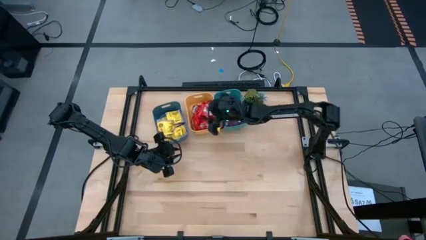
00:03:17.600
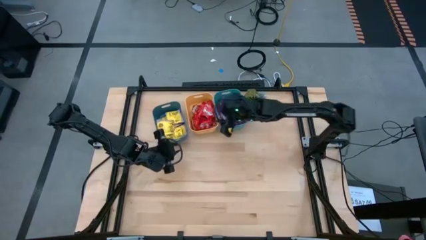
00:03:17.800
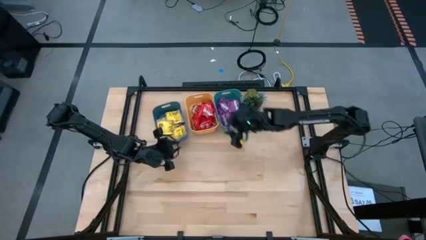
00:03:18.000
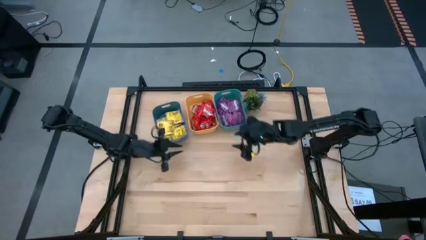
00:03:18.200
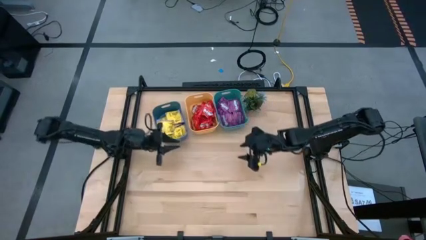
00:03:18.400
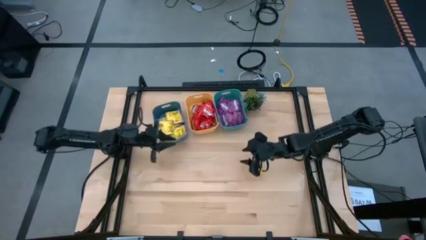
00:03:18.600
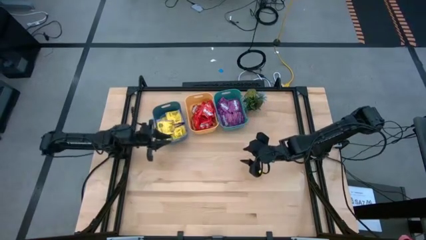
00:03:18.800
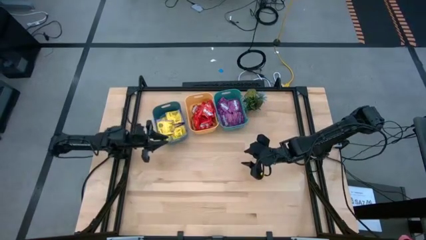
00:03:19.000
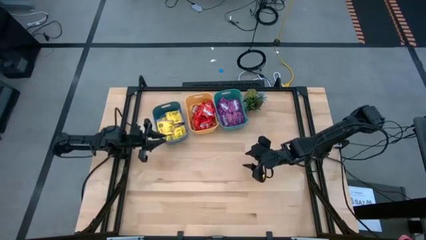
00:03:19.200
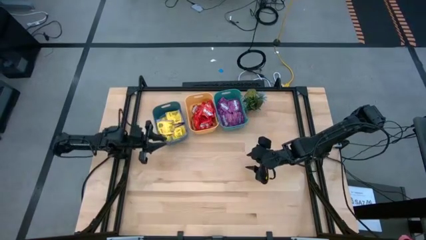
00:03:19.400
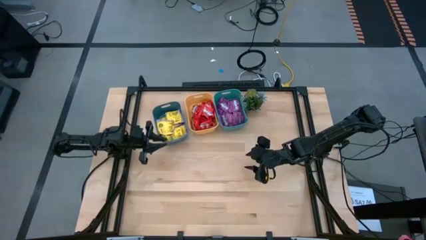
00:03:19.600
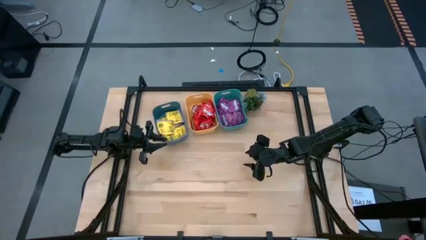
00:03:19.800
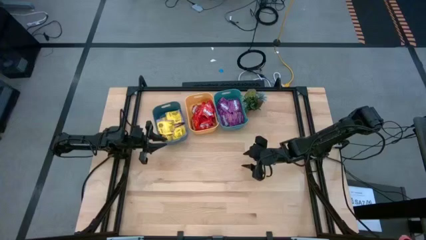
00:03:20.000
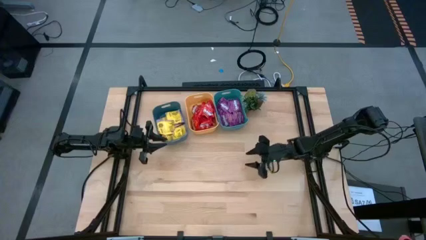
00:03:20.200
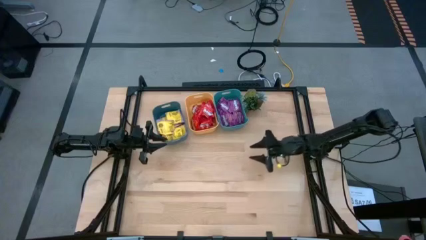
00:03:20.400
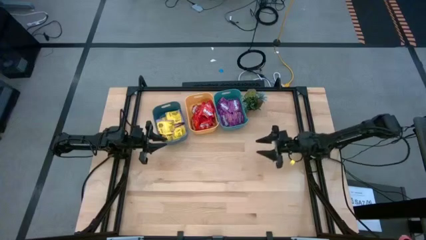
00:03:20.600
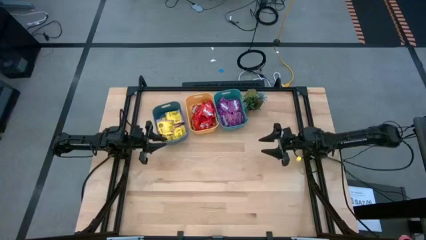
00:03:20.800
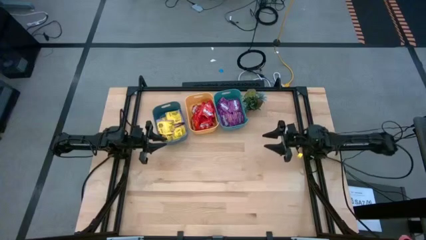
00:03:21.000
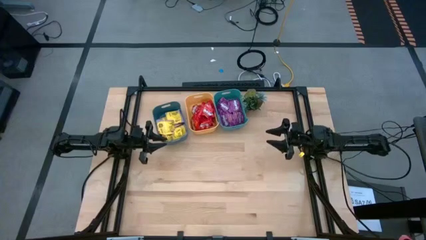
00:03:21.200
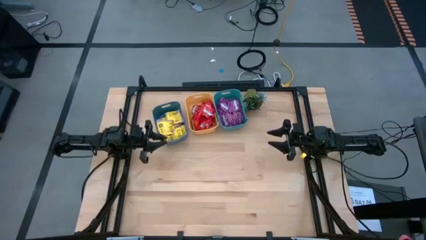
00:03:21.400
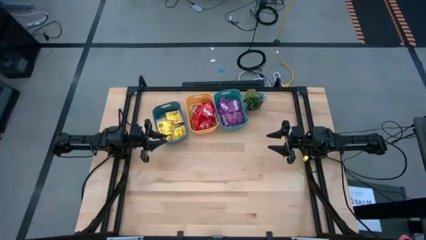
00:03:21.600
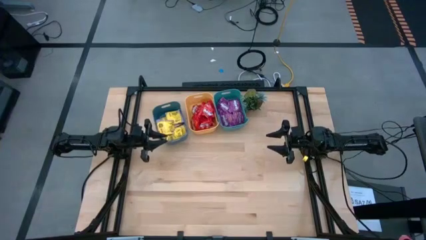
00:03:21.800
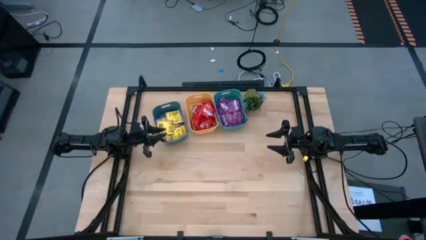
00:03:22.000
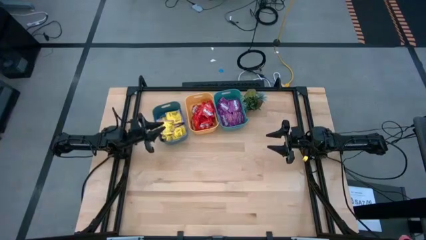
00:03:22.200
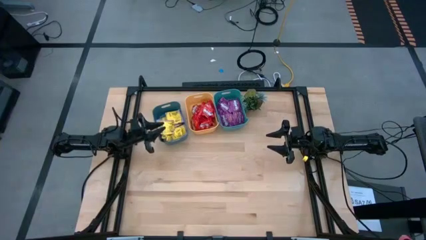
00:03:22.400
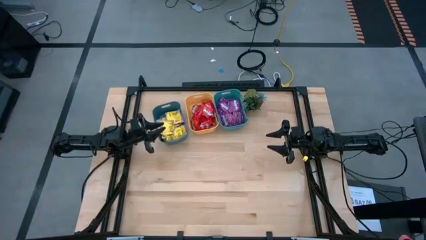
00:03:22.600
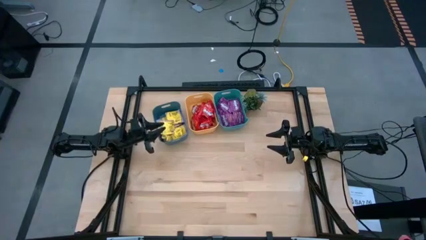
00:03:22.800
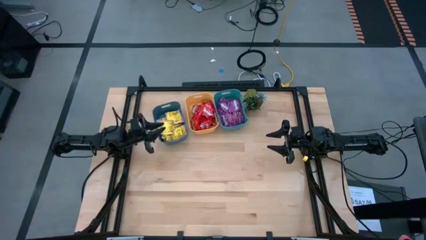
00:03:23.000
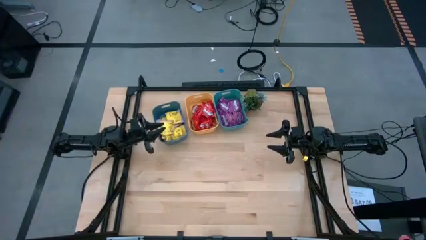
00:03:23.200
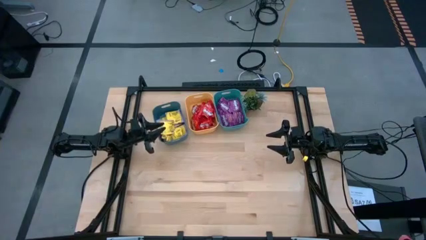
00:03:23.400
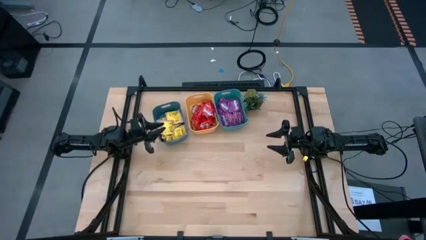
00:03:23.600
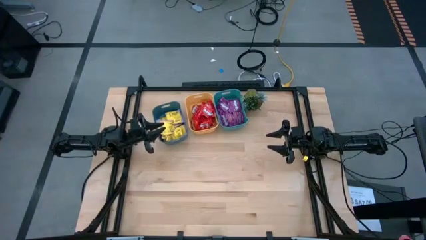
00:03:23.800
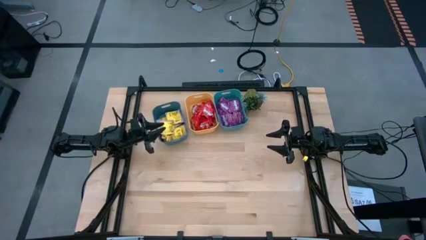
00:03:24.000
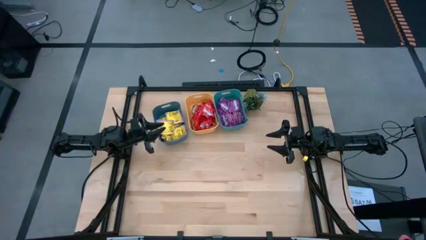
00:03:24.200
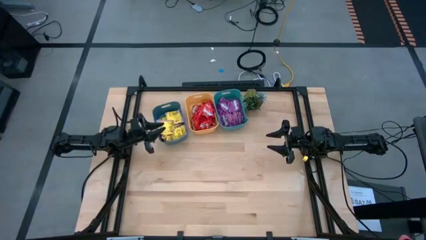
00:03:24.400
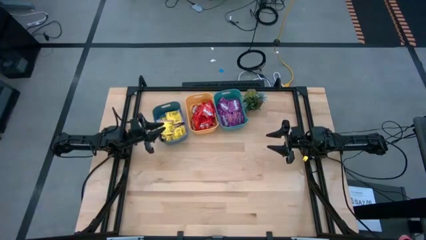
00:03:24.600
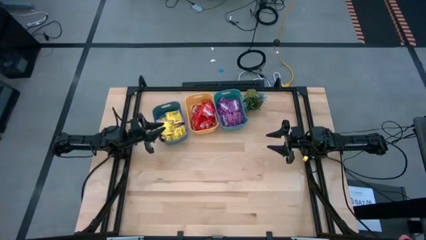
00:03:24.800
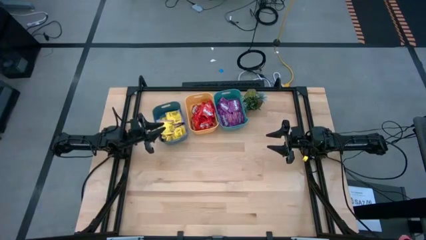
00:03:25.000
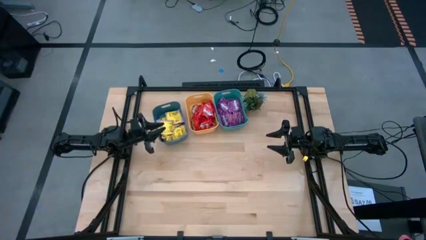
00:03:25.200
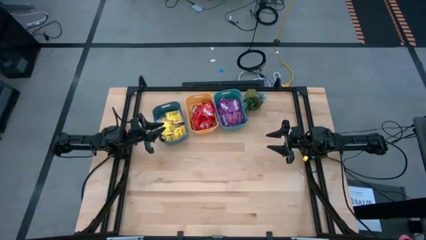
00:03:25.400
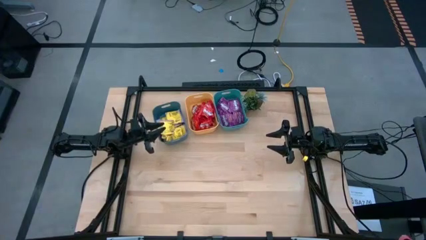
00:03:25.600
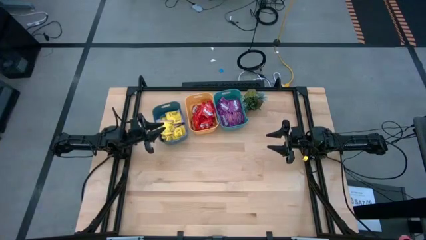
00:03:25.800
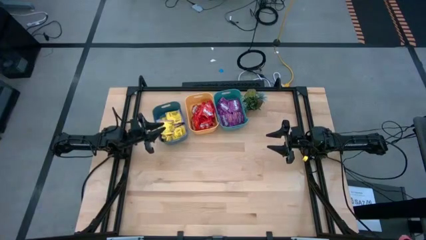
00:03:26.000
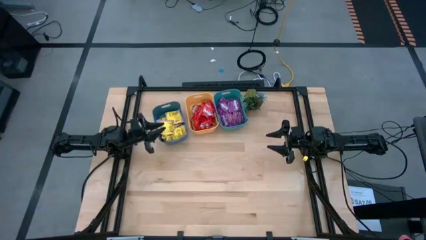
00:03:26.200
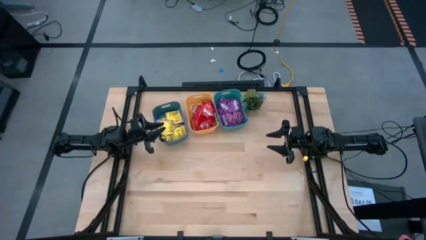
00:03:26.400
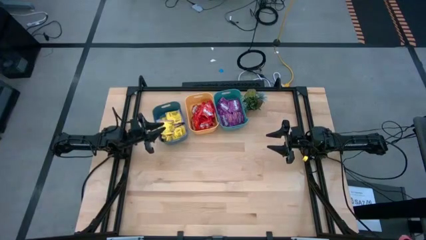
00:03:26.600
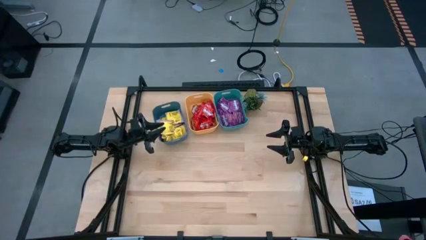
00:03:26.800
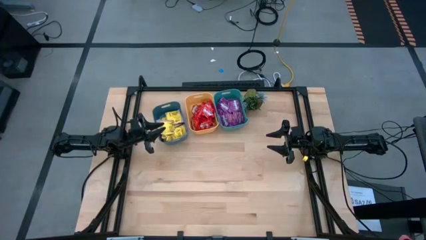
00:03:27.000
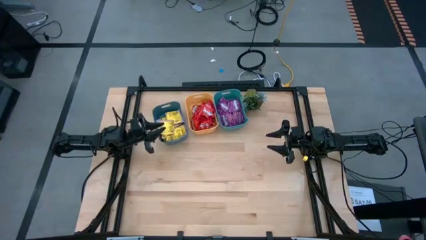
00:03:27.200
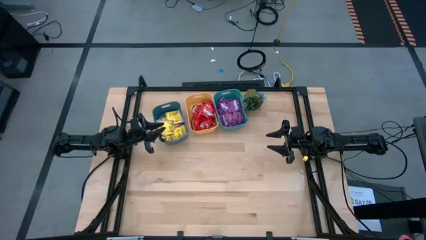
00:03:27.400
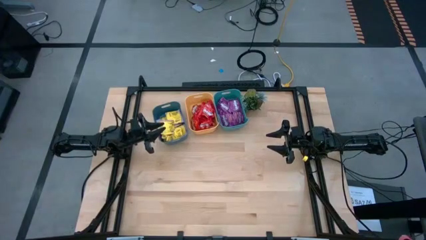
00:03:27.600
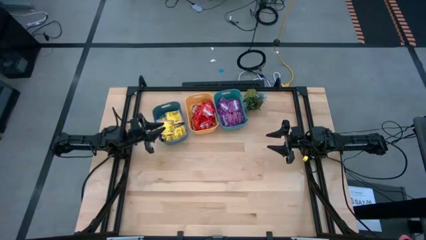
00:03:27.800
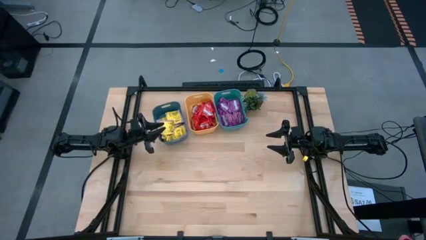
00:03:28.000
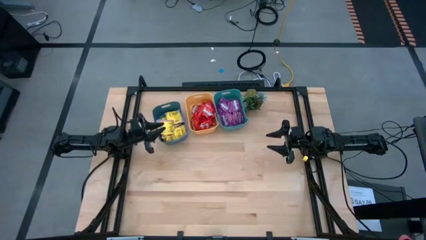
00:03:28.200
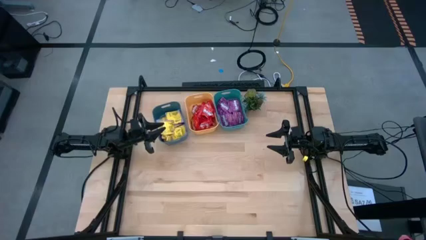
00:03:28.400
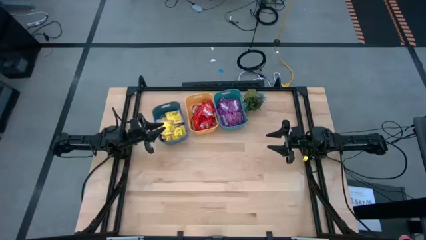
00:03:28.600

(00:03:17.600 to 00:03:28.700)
Task: Sort candy
Return to Home Position
